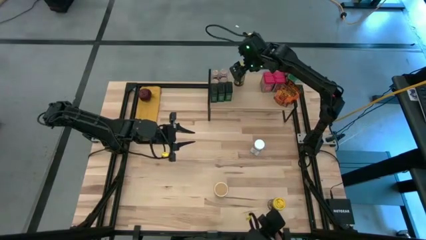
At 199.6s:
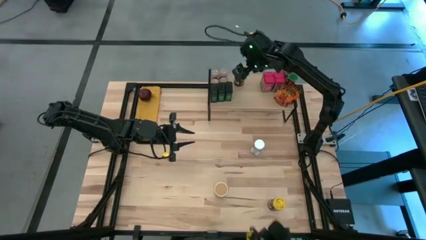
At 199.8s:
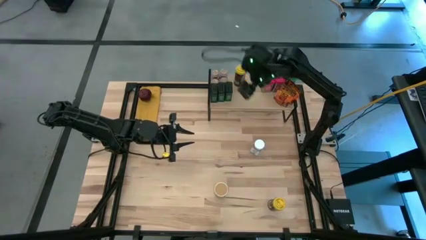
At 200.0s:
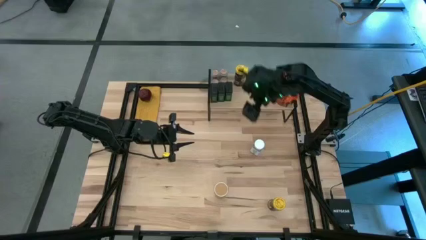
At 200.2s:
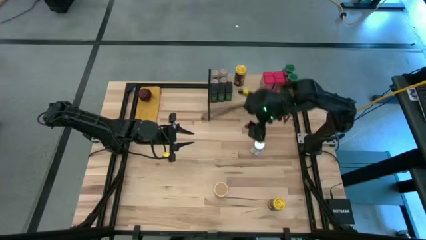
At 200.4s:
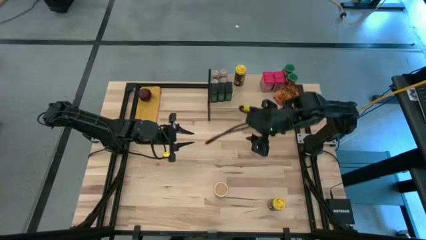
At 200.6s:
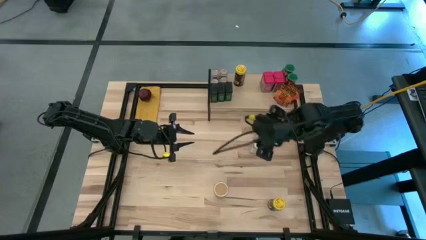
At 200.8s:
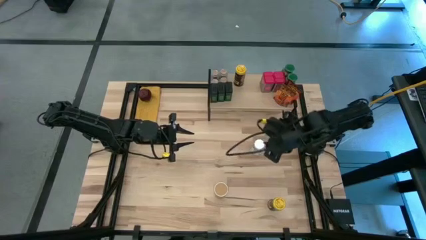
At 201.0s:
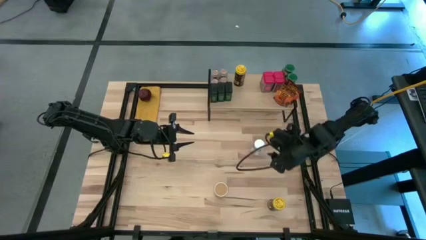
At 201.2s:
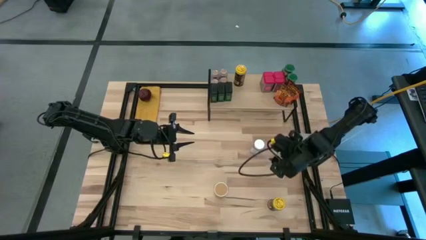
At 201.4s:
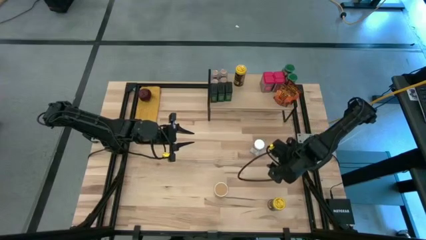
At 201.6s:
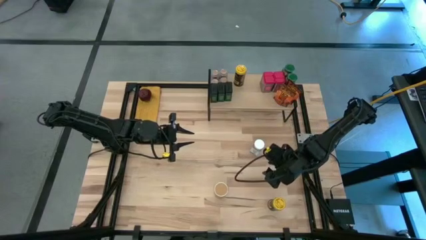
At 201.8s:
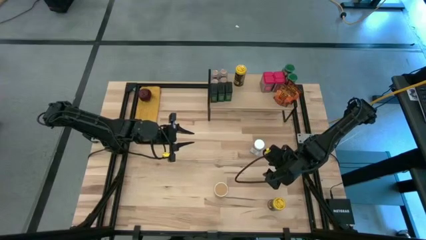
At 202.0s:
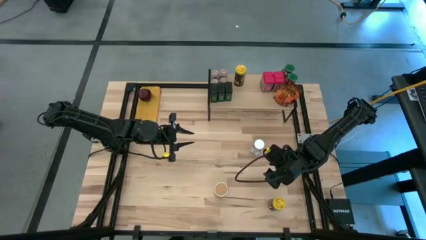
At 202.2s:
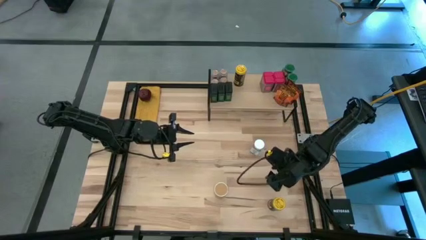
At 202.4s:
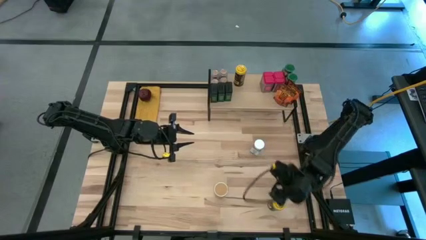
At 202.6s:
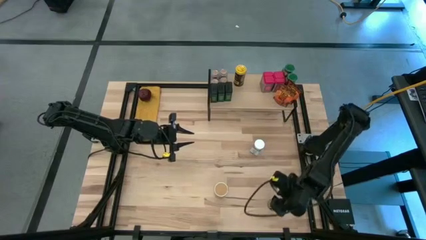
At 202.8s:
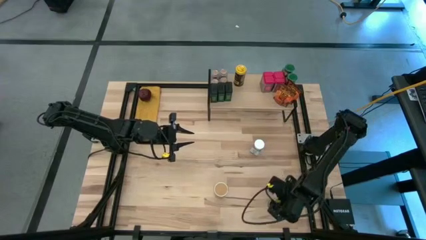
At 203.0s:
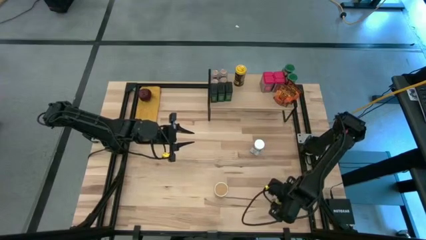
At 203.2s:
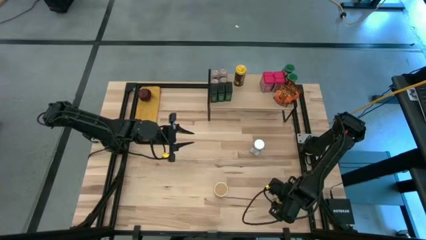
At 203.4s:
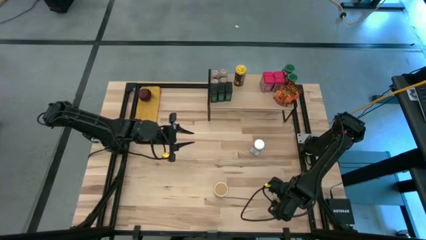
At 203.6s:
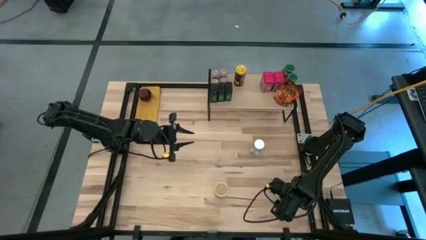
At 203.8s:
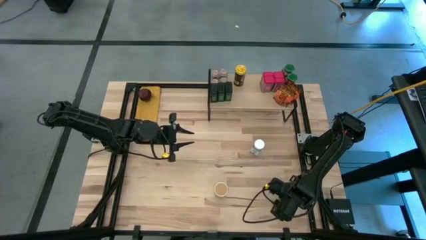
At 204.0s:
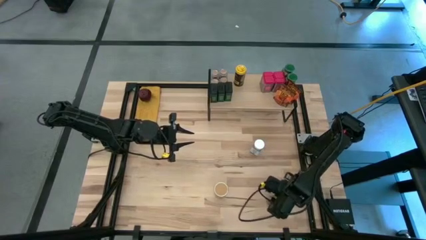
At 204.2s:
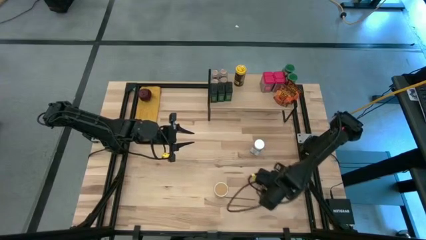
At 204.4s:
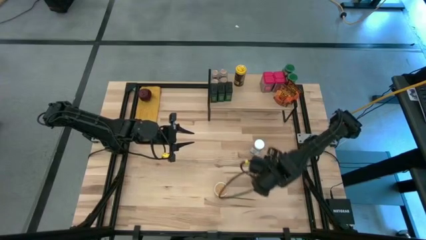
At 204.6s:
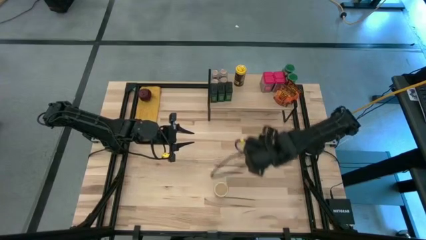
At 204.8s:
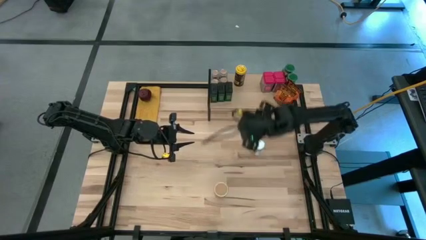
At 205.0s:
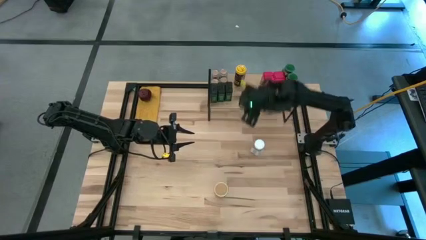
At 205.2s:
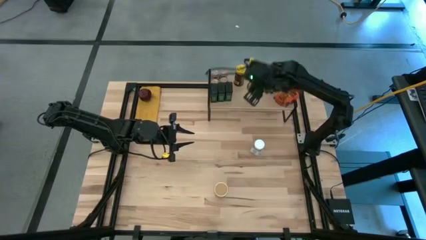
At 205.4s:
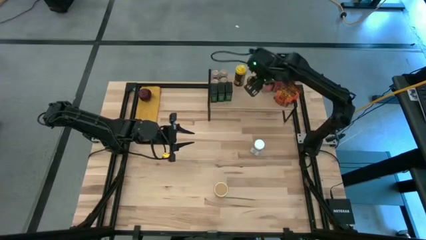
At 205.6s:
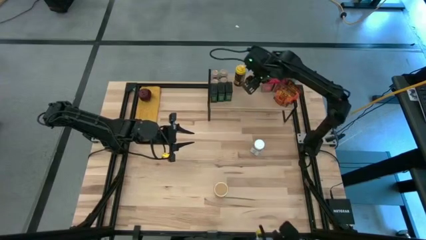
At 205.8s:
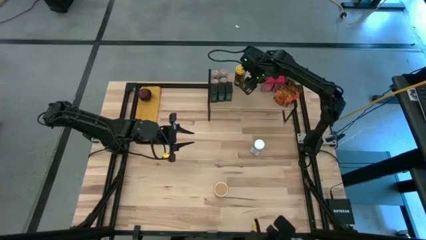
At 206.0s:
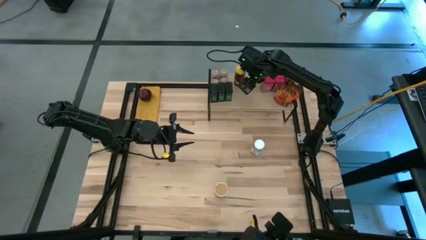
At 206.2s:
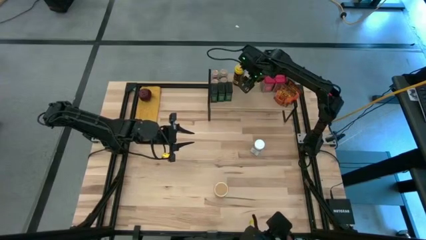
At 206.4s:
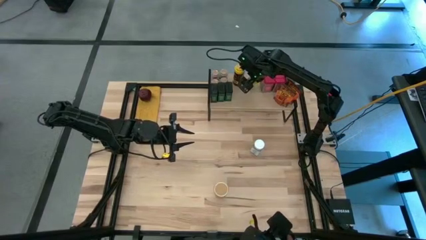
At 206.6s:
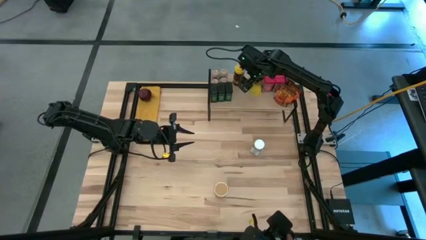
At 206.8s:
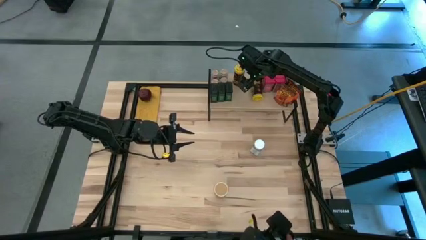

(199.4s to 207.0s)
Task: Shelf spices
Put the yellow seasoning bottle on the shelf and align it with the other yellow seasoning bottle

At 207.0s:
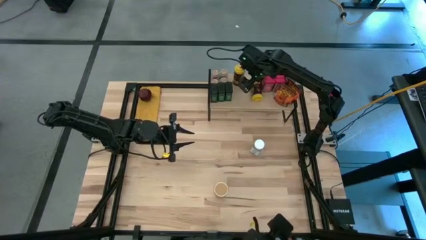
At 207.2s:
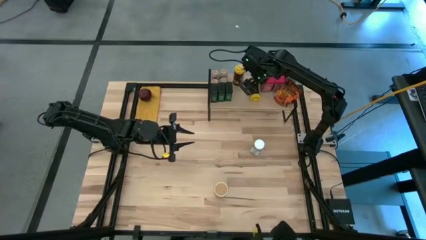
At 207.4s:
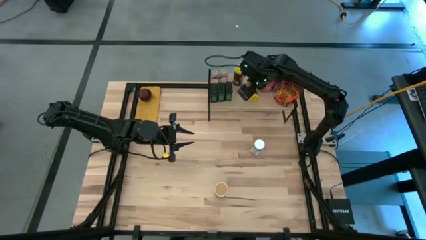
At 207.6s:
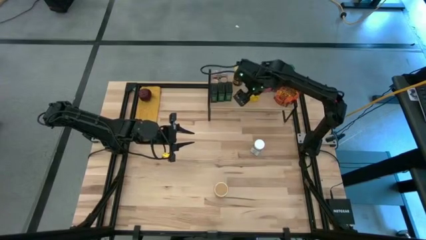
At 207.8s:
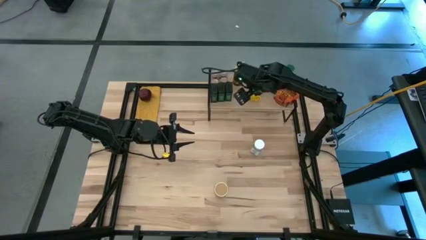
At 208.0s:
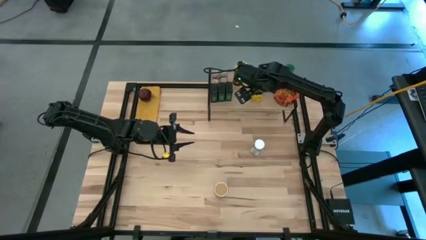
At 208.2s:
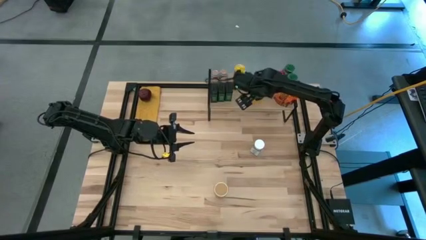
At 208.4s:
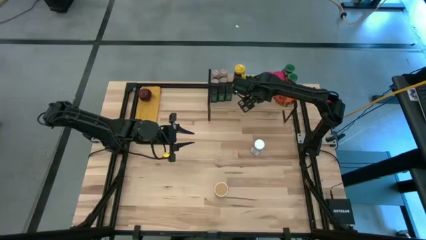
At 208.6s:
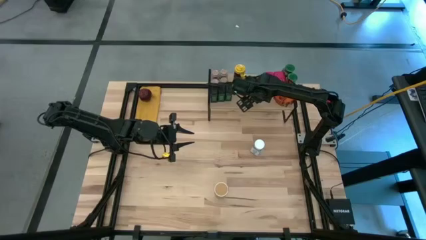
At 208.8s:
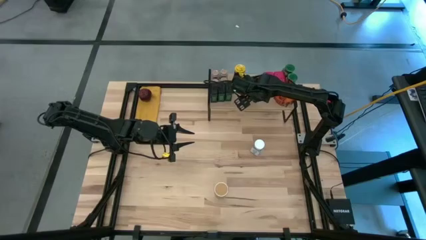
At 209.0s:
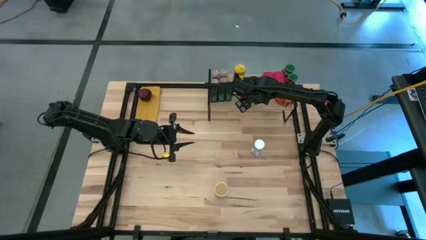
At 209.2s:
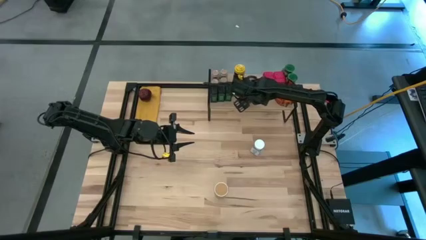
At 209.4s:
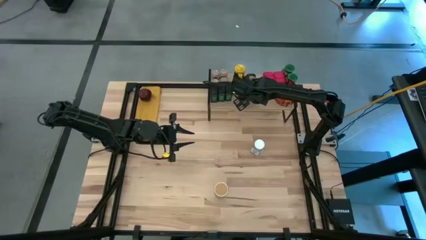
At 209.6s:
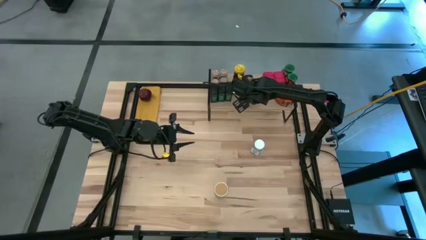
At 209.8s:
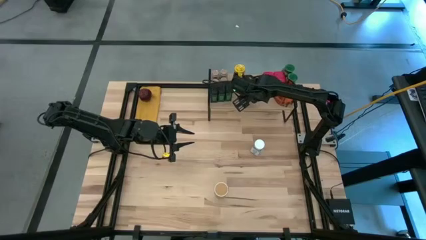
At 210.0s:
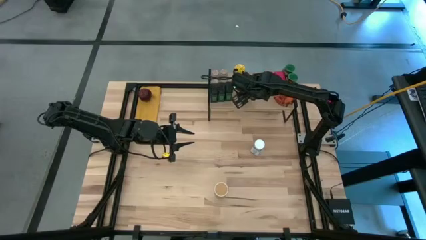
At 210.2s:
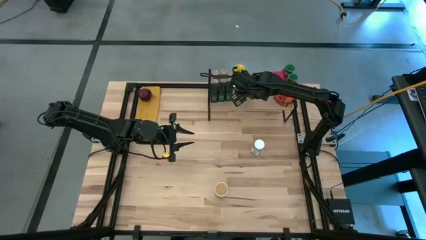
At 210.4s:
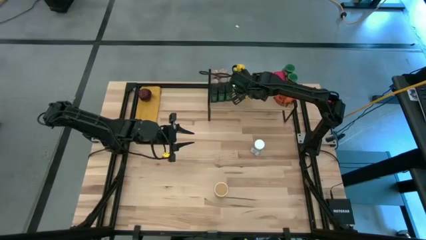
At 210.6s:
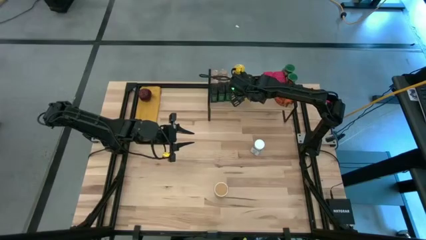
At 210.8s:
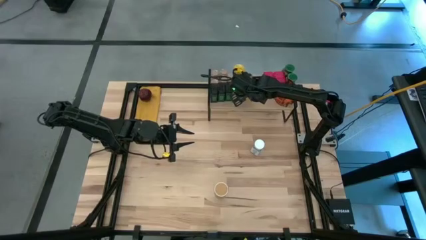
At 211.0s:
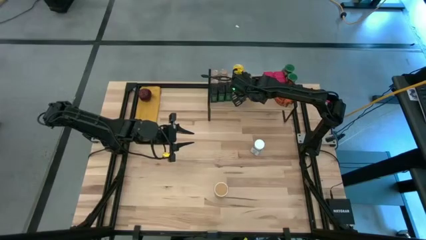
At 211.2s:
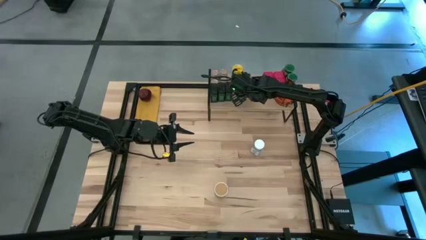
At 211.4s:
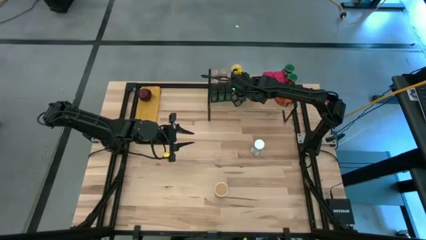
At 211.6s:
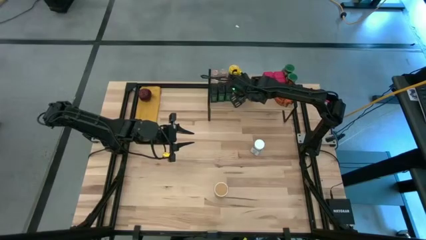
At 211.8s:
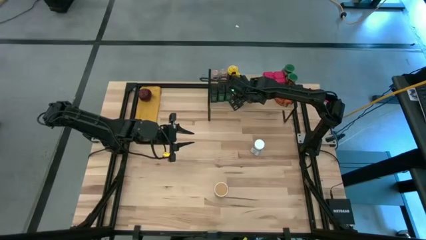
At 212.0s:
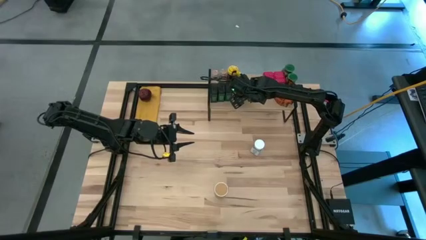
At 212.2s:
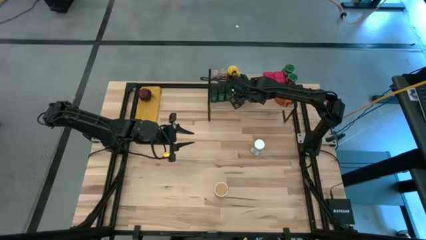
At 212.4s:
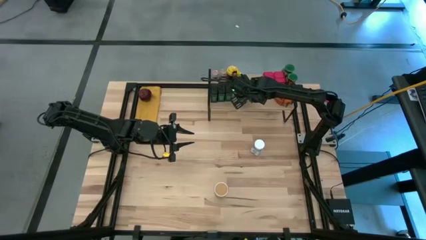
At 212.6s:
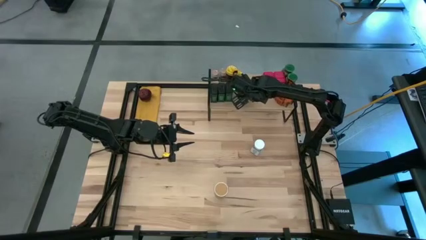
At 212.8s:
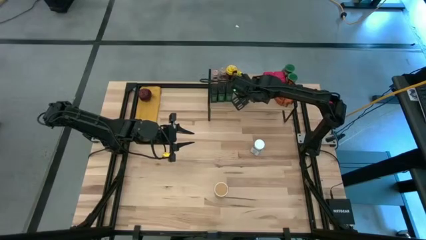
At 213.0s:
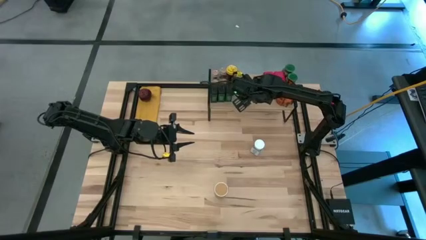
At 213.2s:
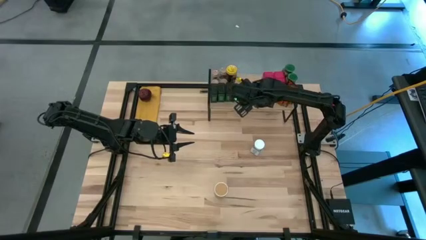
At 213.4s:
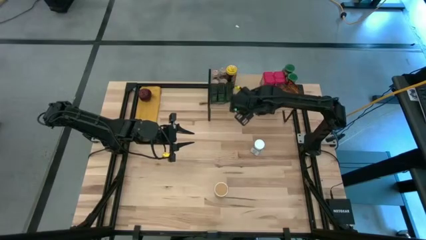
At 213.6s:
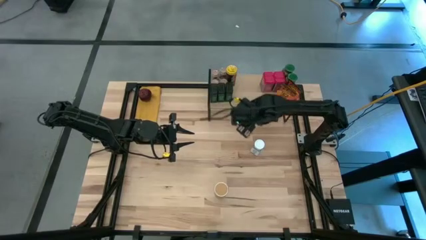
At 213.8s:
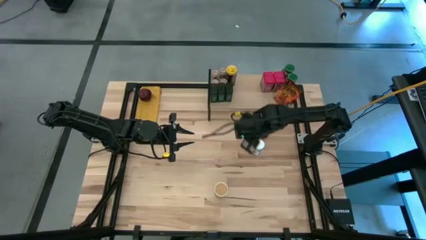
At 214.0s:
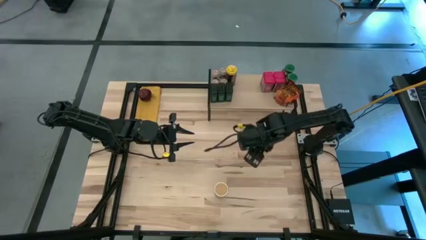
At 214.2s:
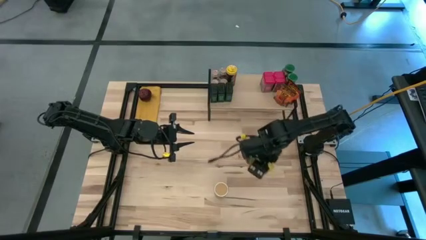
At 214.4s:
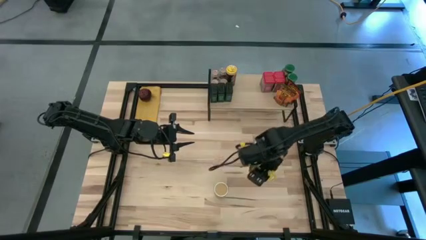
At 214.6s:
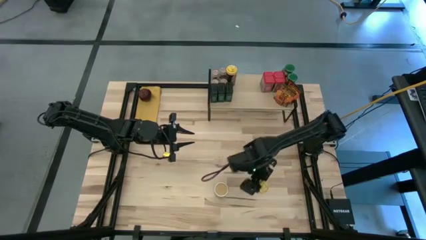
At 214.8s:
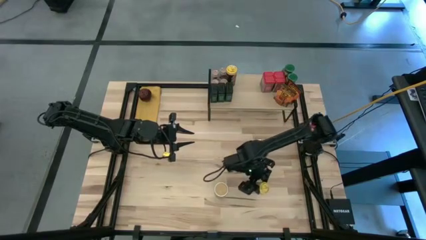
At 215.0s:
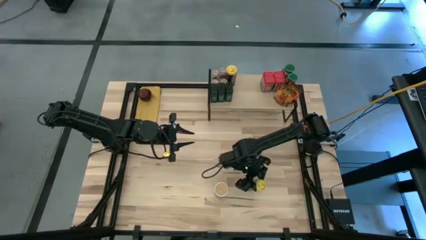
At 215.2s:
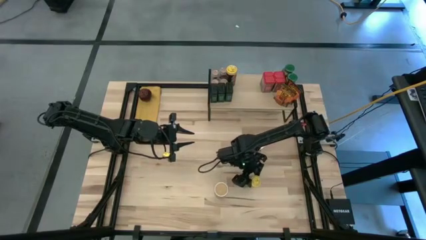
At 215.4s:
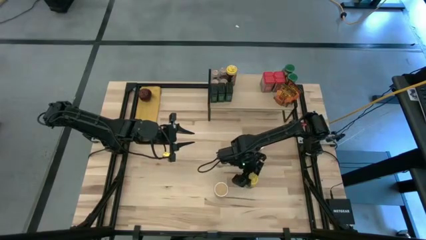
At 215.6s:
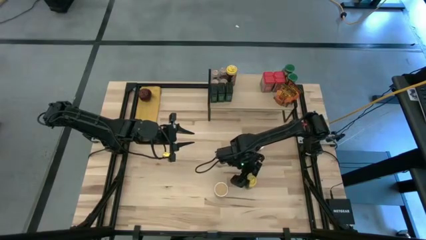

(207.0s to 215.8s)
Remove the right yellow seasoning bottle from the shelf
